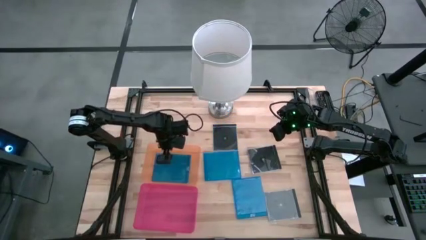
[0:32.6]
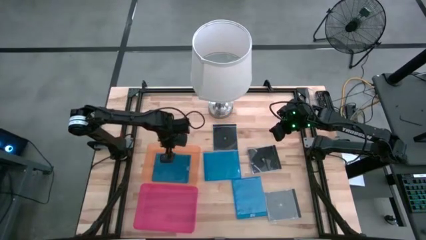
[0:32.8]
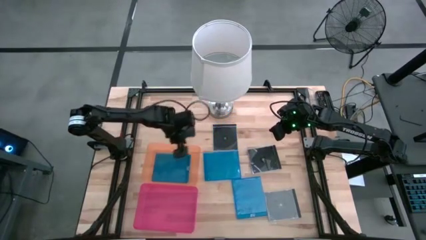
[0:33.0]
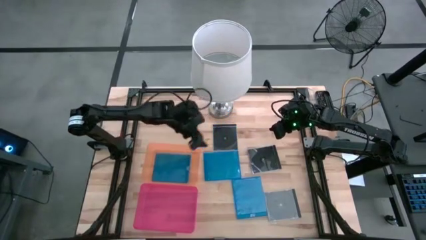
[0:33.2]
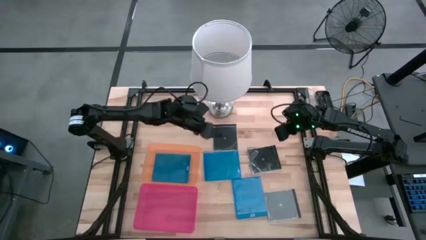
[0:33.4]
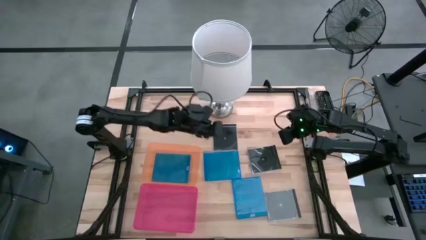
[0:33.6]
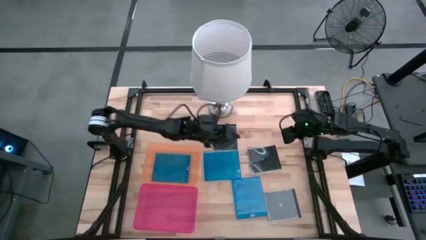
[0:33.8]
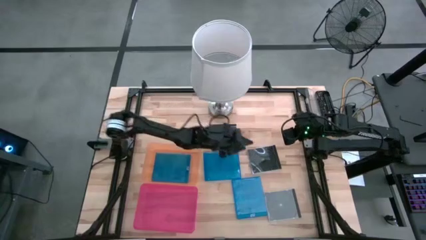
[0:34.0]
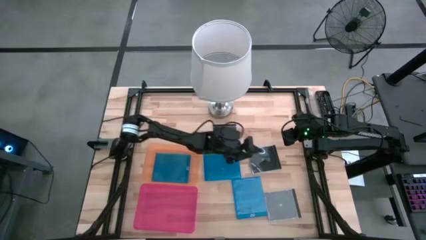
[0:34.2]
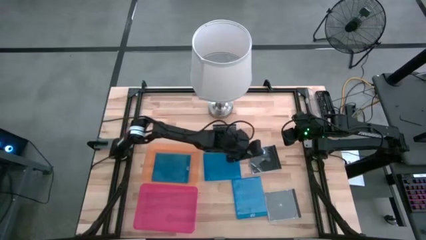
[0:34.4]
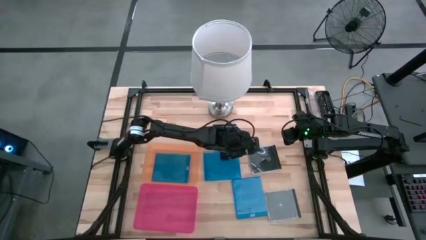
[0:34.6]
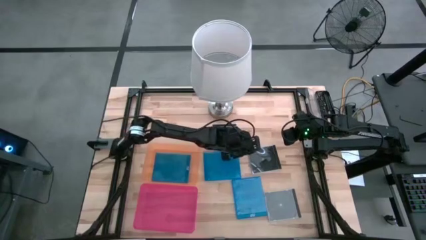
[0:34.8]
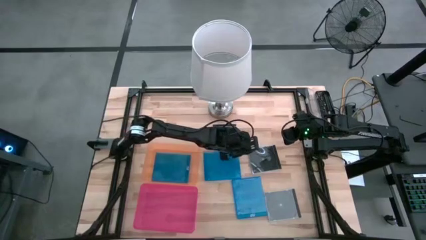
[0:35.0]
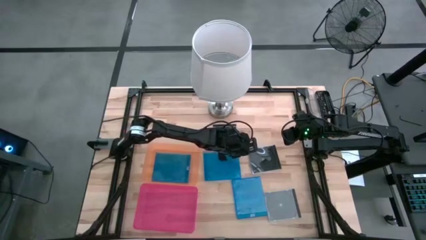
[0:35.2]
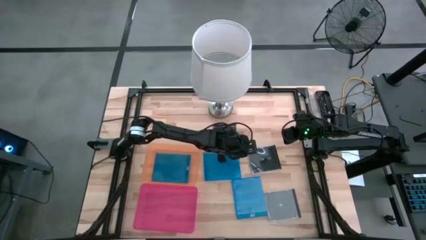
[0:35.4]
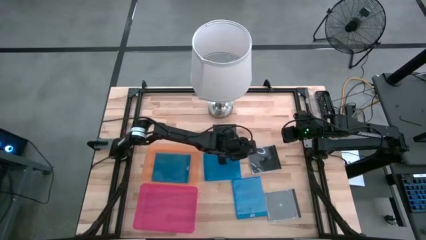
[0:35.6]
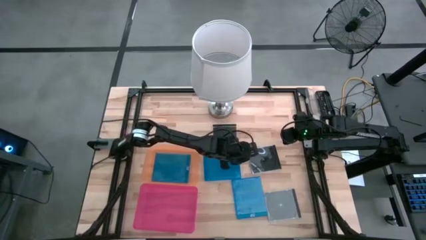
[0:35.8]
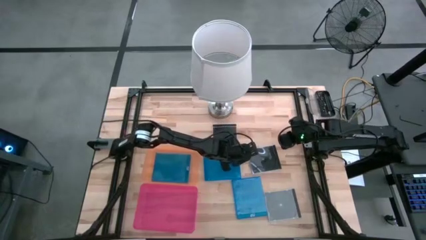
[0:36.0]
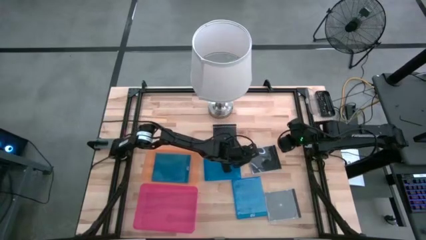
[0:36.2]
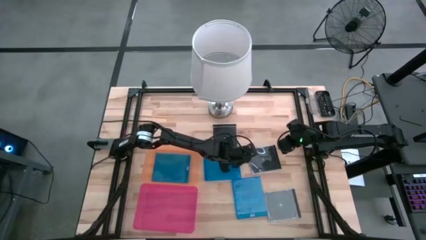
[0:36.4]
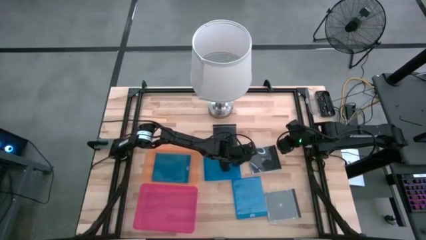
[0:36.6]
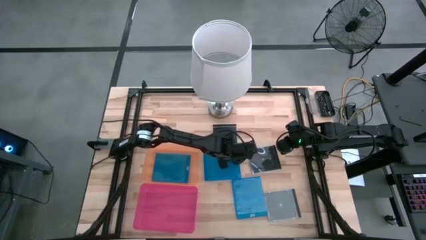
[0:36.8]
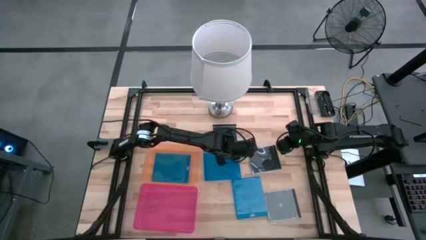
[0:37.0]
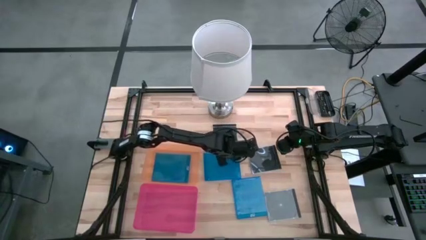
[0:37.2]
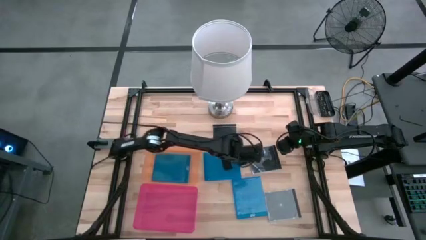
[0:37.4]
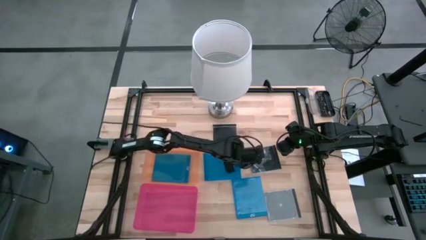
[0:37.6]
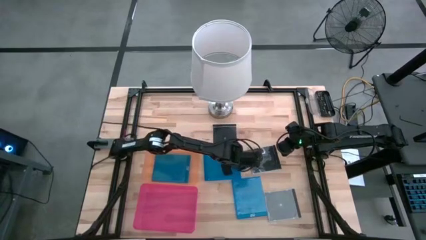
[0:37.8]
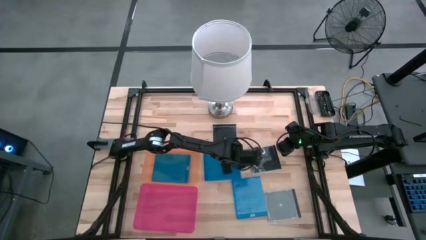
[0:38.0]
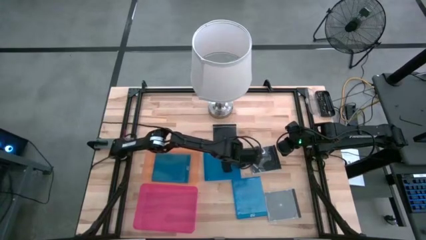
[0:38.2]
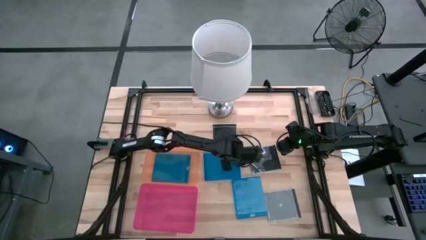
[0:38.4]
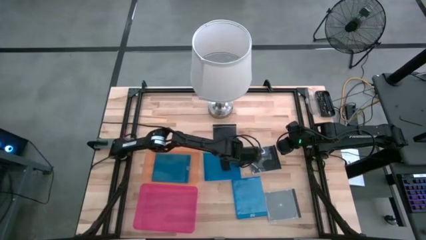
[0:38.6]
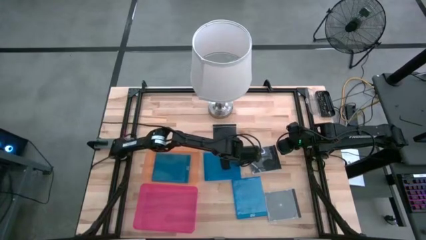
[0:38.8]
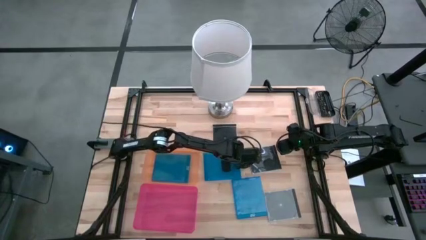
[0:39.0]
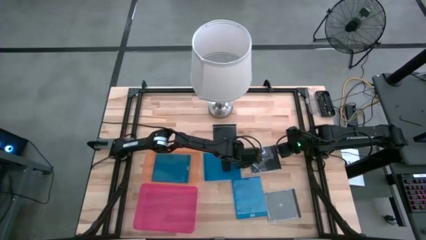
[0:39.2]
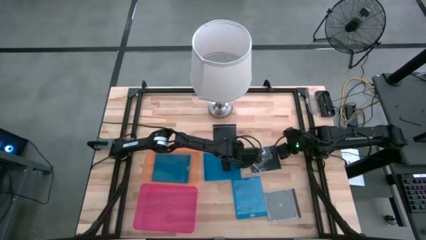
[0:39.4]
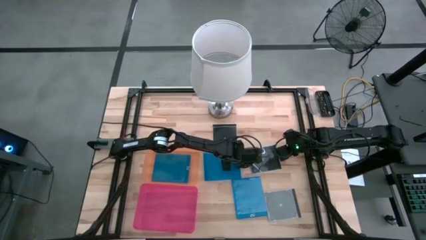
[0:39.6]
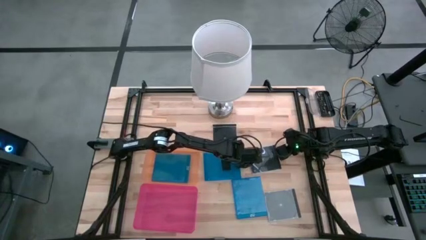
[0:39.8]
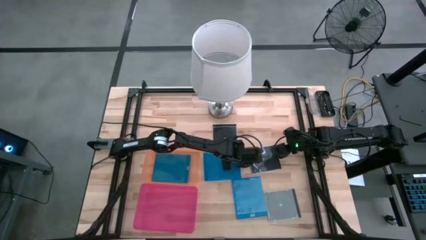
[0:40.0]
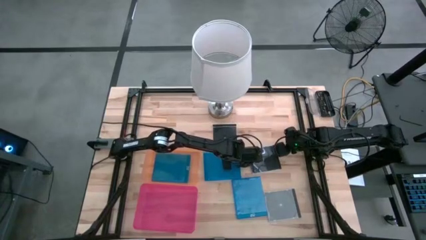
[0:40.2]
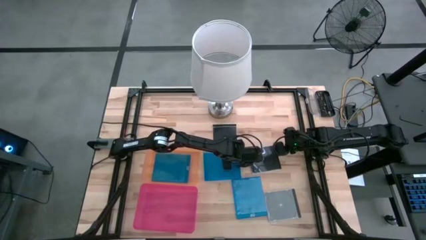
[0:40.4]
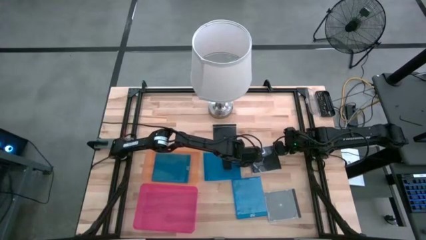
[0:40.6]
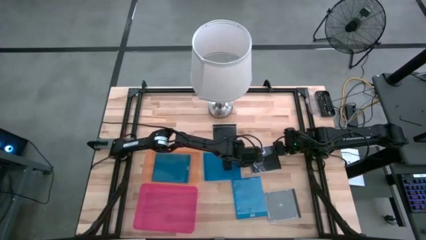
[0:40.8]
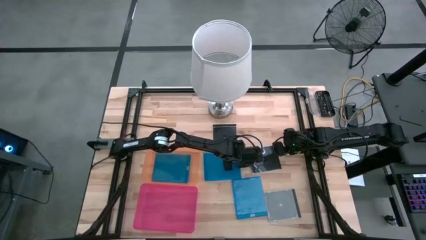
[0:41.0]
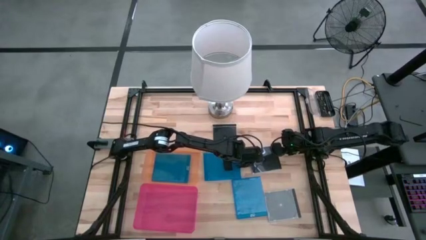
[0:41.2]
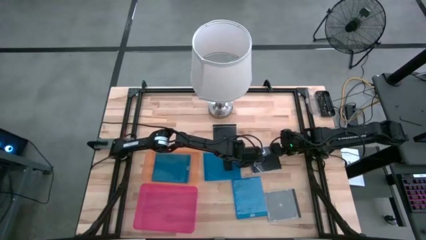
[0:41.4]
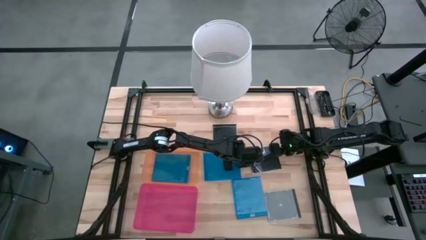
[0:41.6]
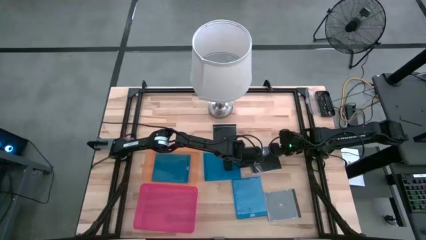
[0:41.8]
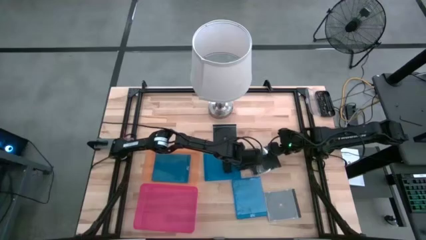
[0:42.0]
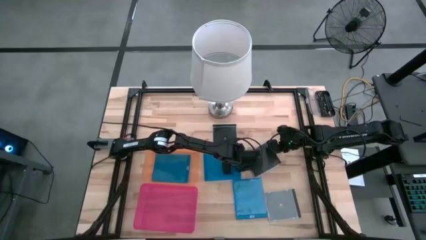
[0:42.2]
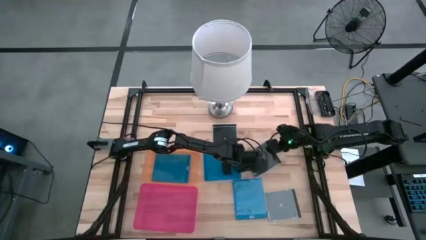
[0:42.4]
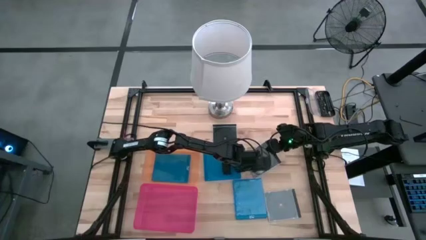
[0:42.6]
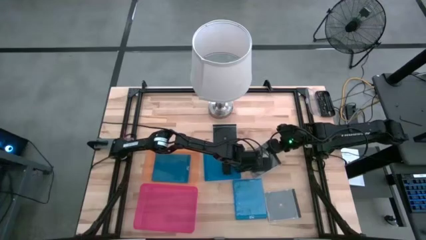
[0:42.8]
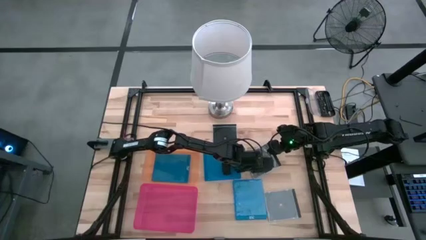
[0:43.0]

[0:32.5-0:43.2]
Task: Pick & place jewel cases by type
Put the middle right black CD case into the pink bin
